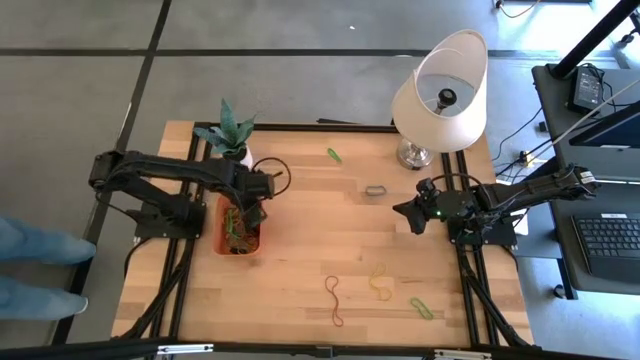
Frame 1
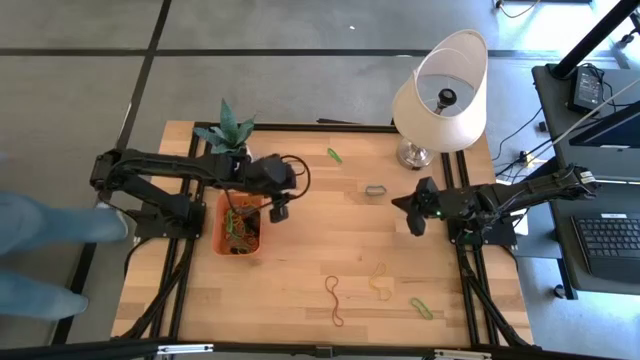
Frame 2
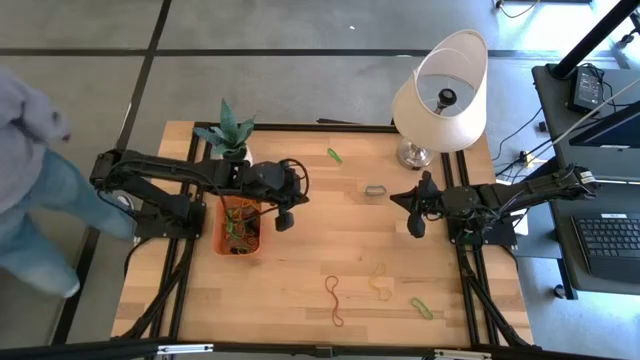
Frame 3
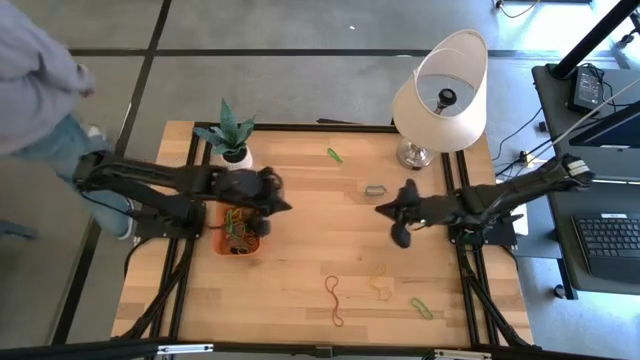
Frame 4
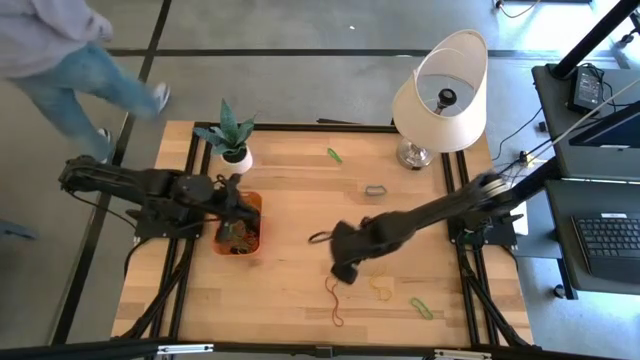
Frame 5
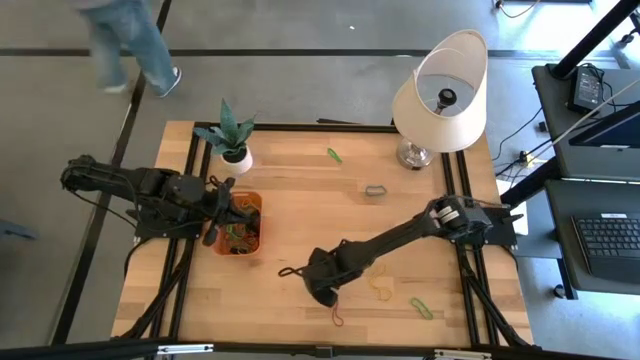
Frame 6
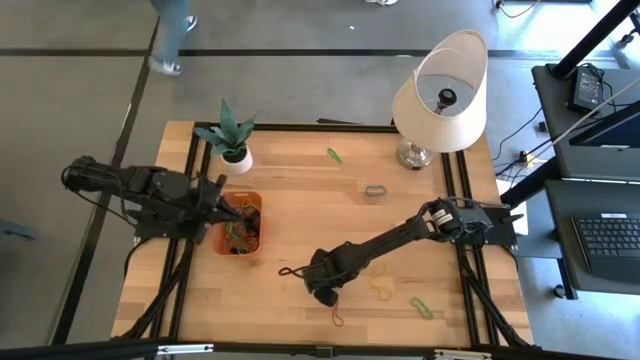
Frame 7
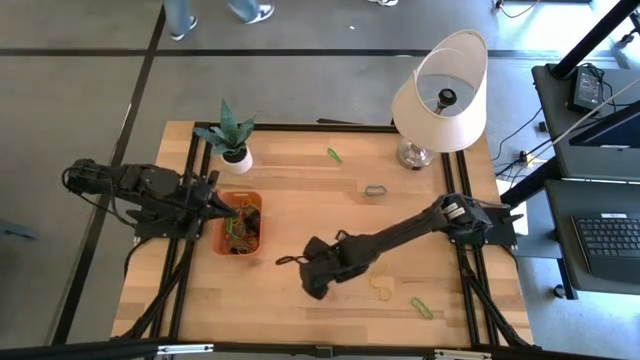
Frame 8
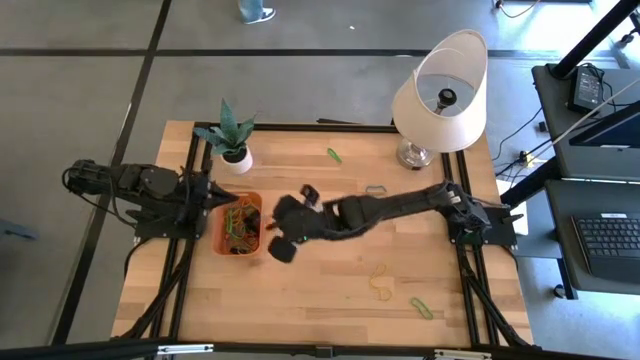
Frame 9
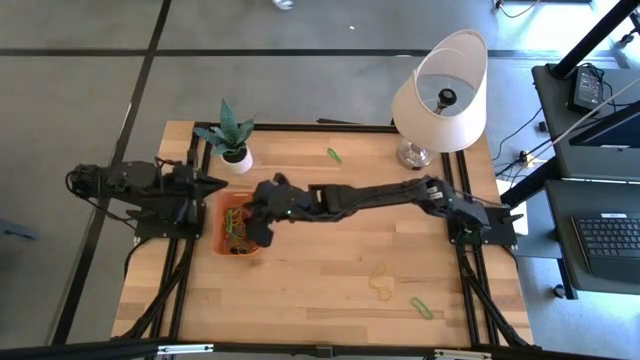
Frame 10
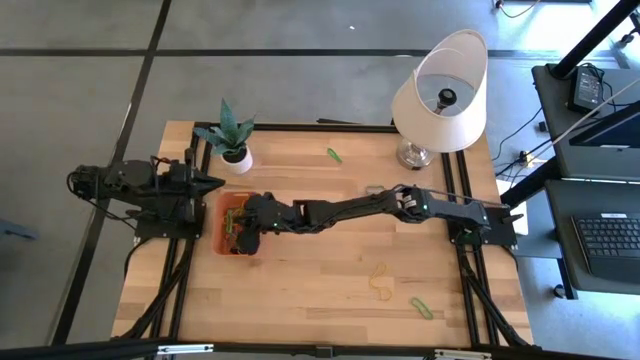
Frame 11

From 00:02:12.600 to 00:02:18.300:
Task: Pick and place rubber bands into bin
Put the red rubber band into the orange bin

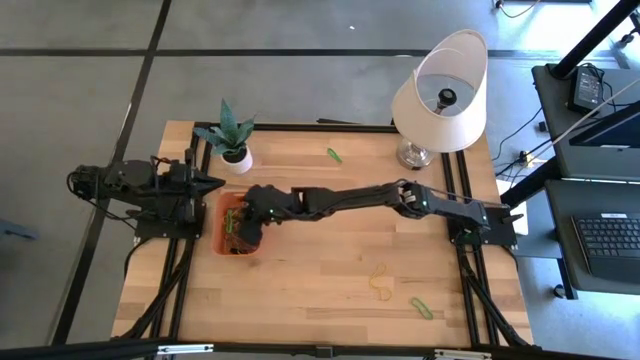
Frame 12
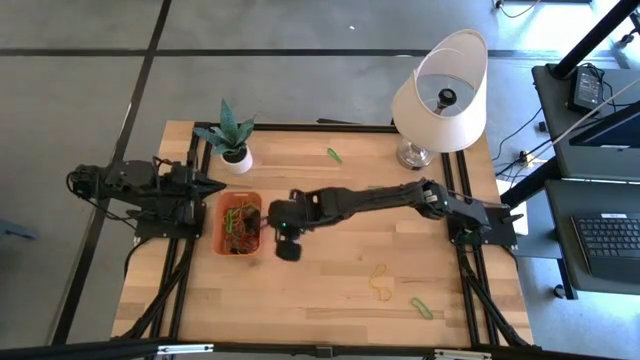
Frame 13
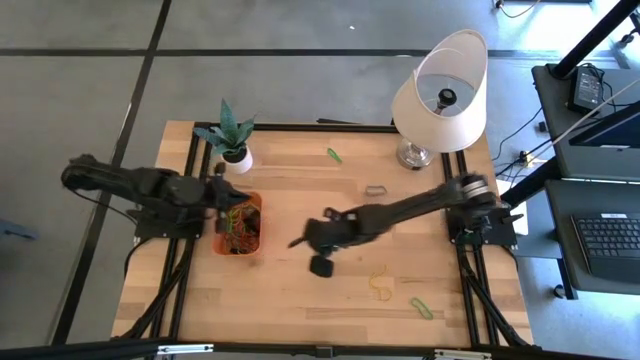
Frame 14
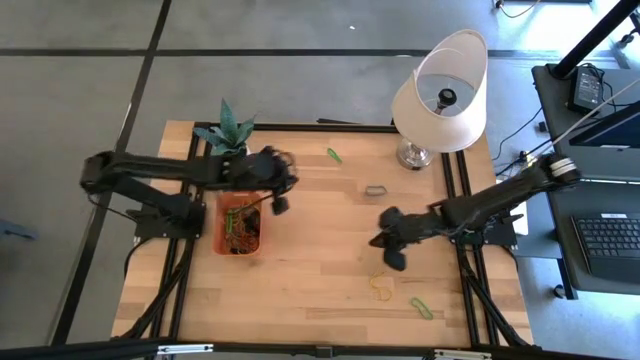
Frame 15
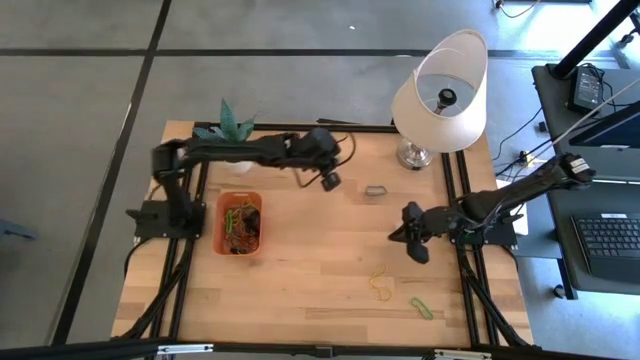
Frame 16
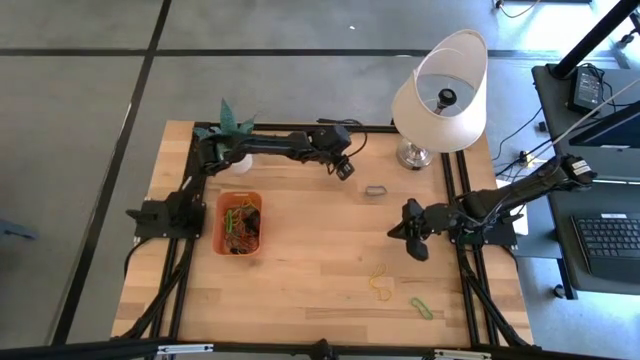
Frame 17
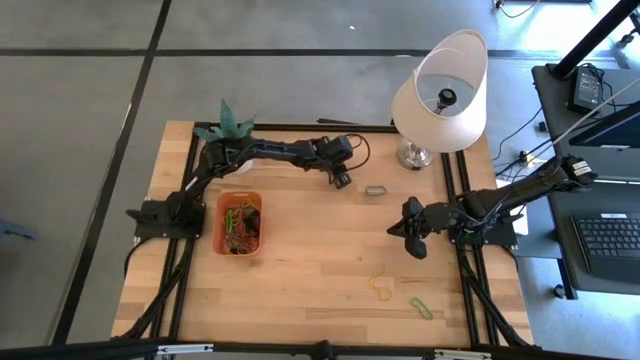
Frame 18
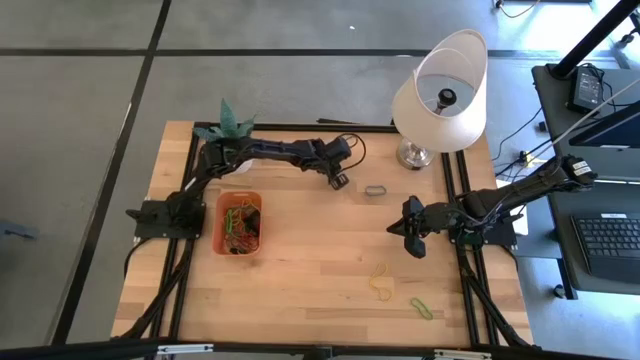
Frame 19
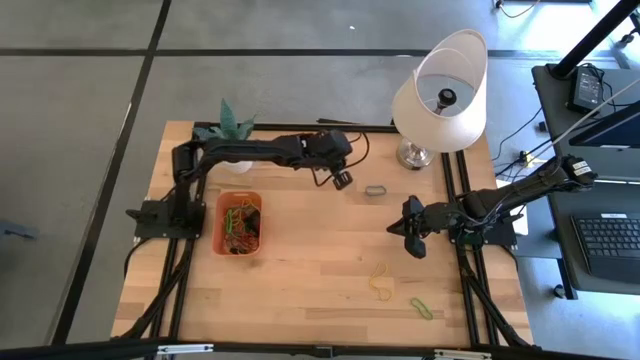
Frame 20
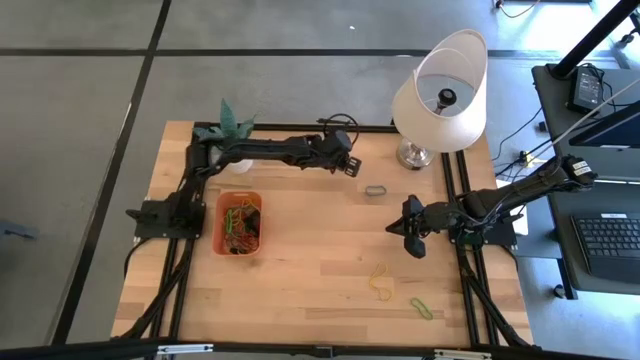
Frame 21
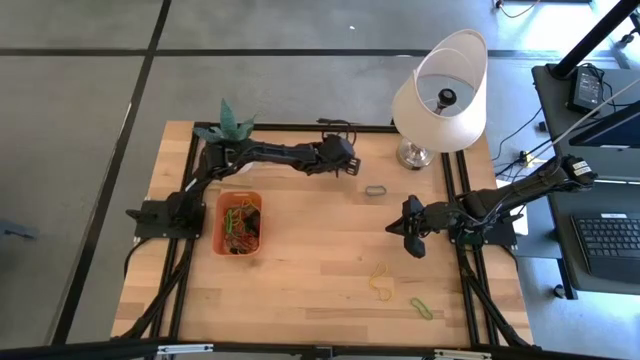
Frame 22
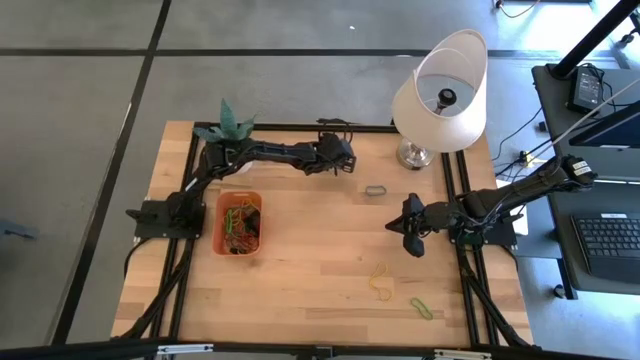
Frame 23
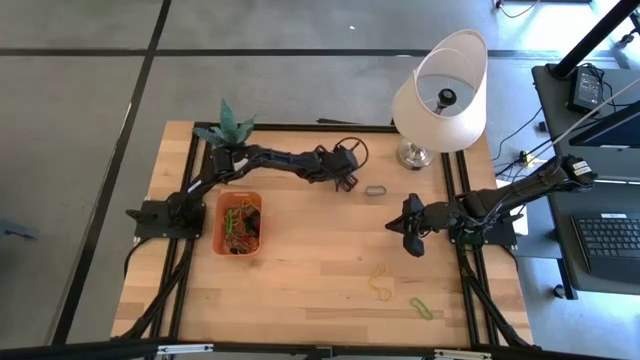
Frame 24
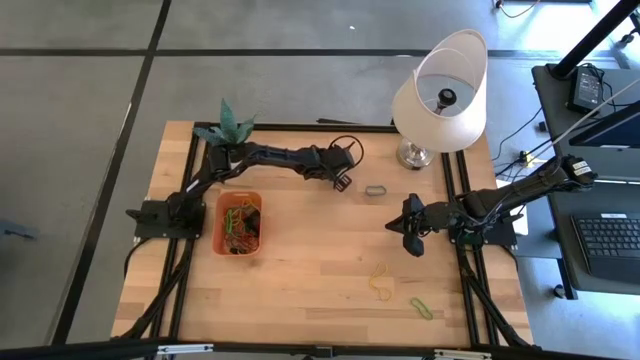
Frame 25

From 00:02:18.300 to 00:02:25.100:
Put the green rubber band into the orange bin

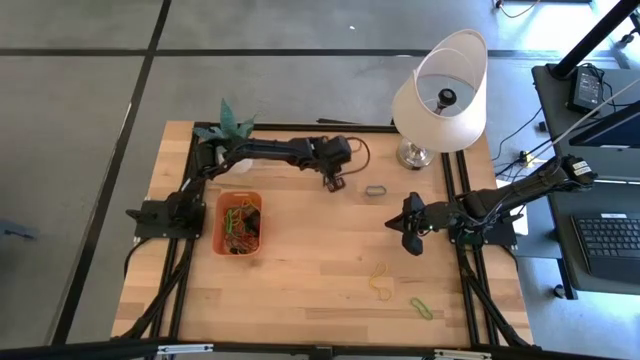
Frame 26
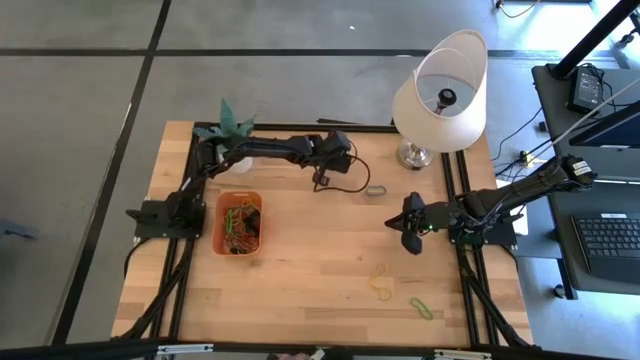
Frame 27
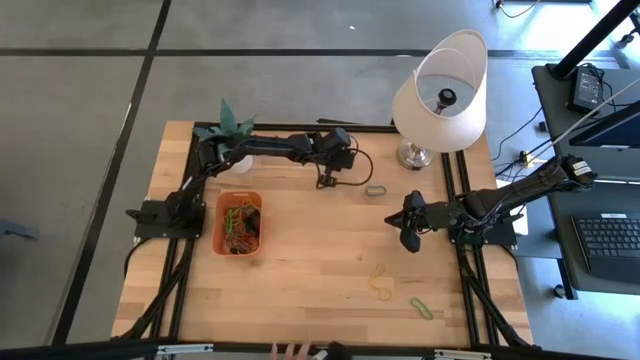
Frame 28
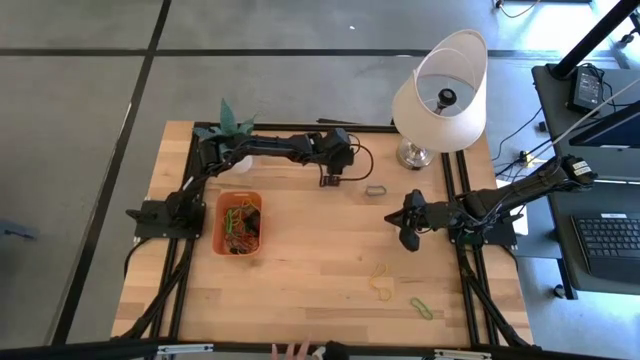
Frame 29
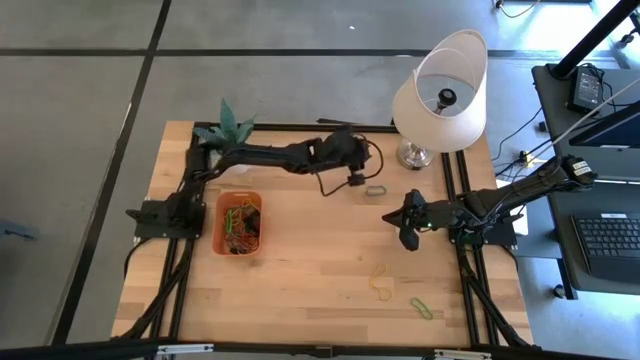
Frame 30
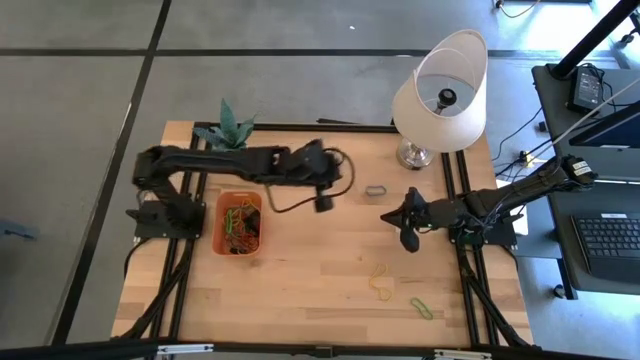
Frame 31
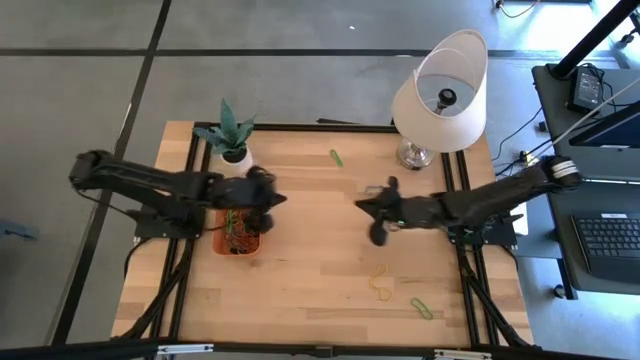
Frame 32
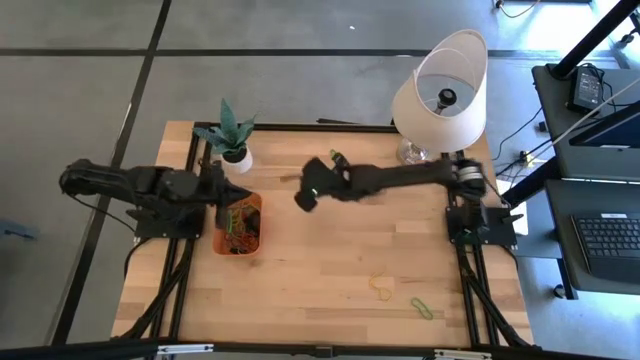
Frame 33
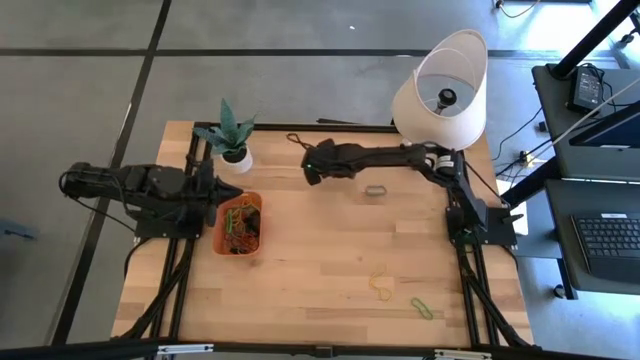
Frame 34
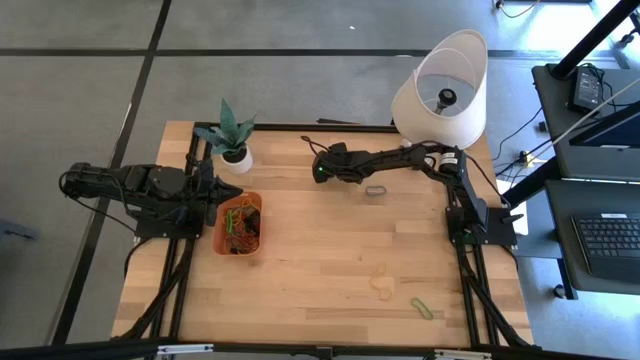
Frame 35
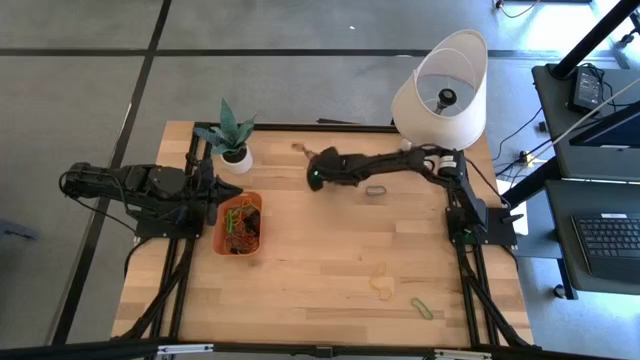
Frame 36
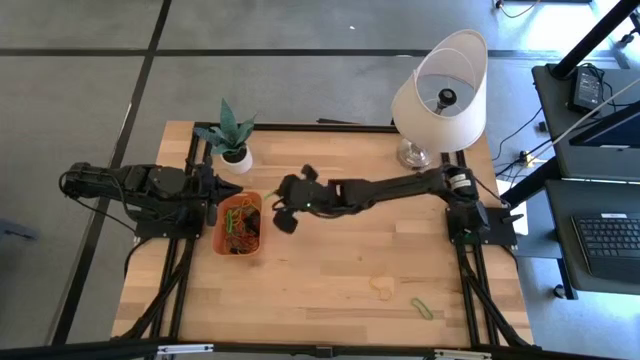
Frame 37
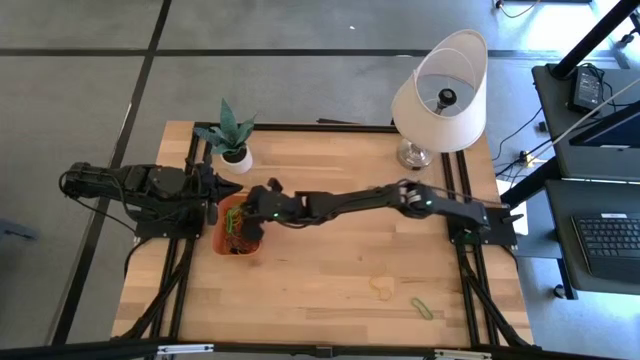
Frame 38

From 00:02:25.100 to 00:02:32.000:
Put the green rubber band into the orange bin

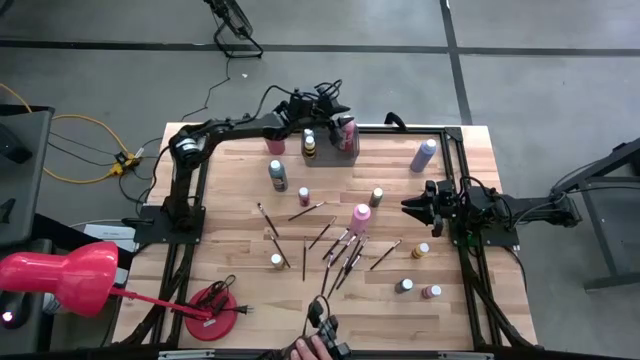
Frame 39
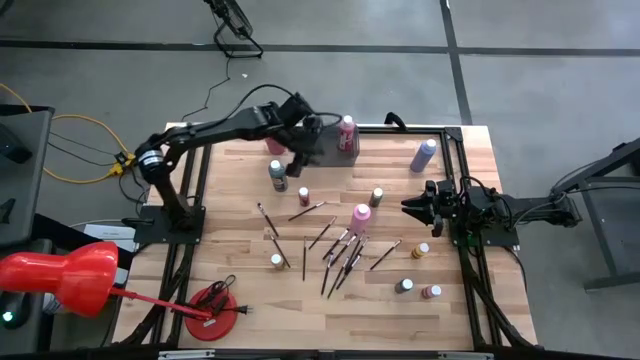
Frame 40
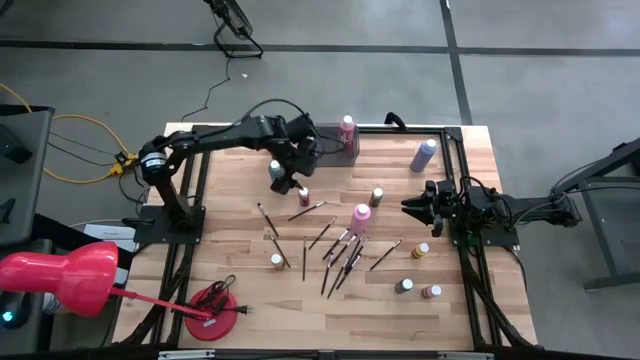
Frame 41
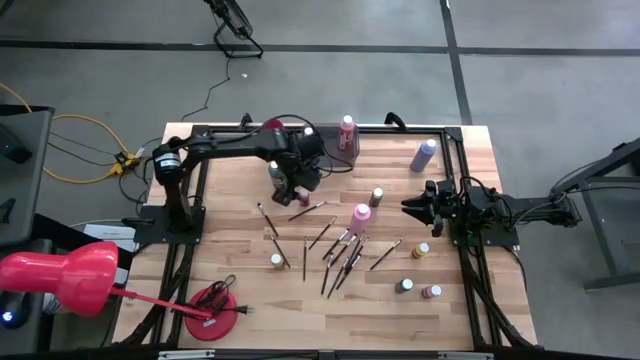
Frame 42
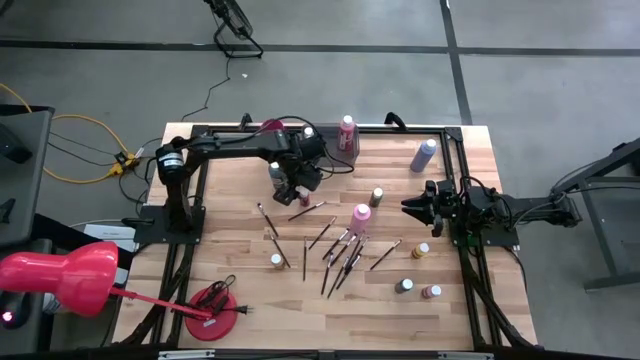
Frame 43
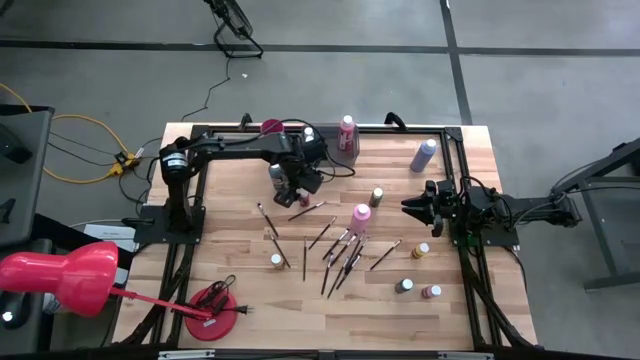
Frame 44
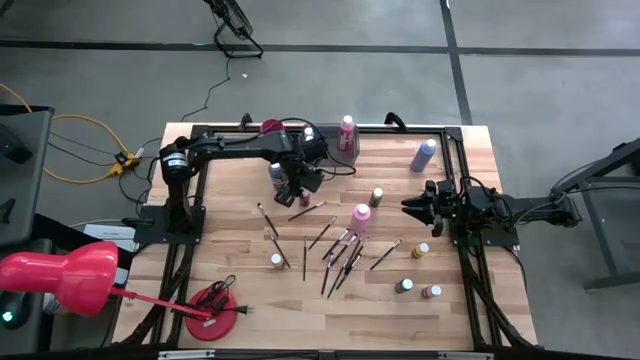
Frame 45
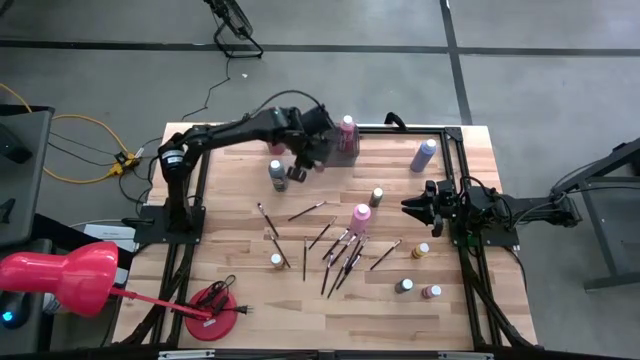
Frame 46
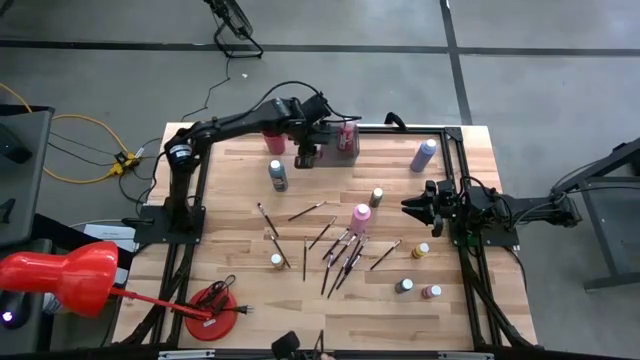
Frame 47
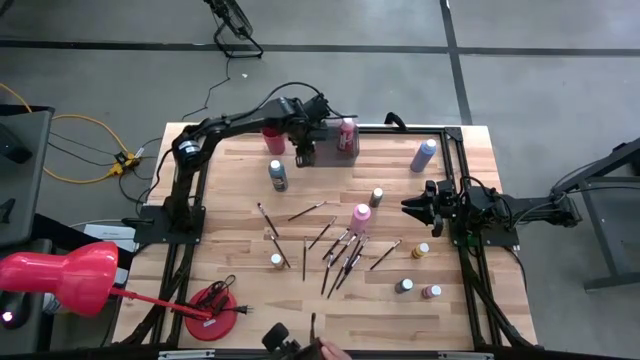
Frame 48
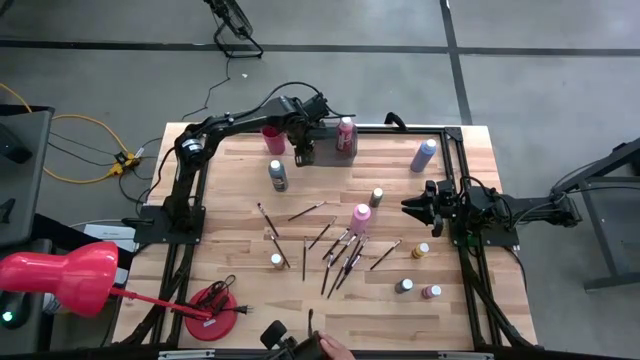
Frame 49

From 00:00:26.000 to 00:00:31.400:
Task: Pick & Place Paint Supplies
Put the small red paint bottle into the black bin
